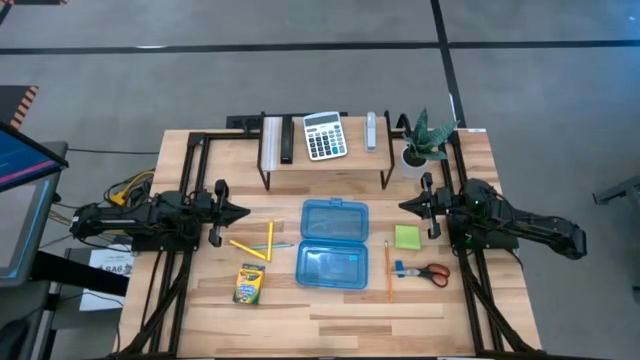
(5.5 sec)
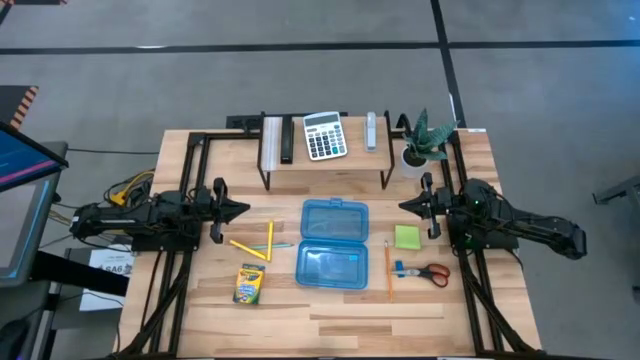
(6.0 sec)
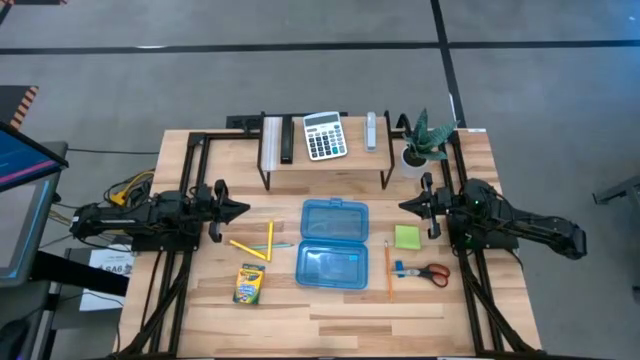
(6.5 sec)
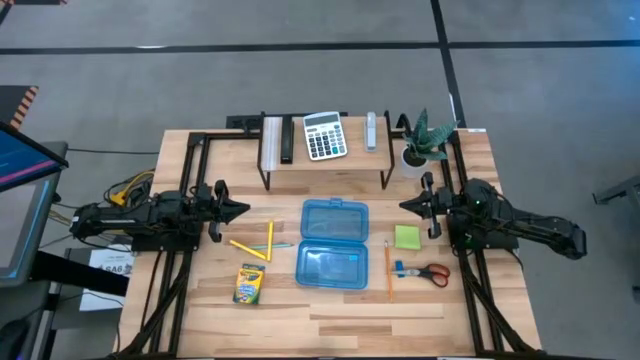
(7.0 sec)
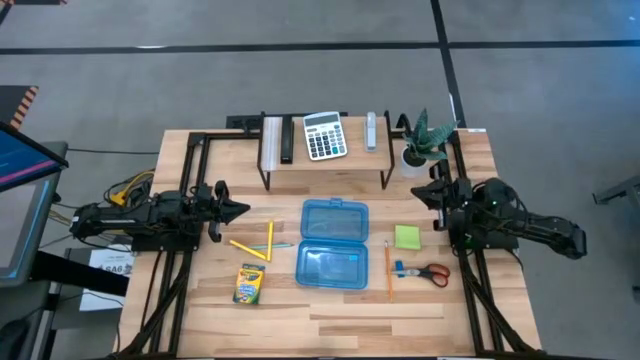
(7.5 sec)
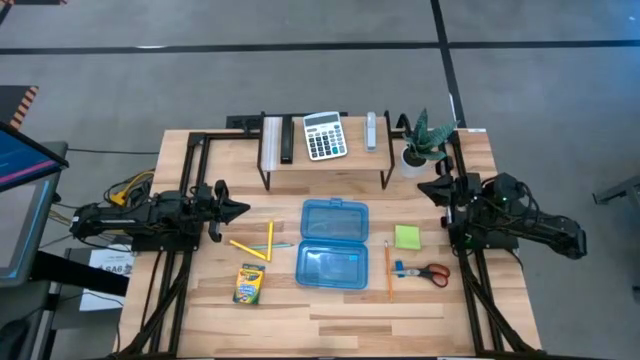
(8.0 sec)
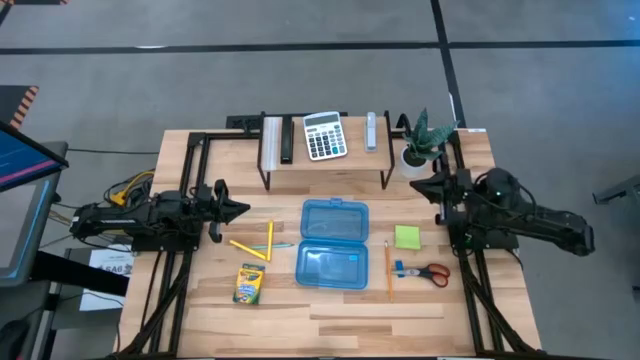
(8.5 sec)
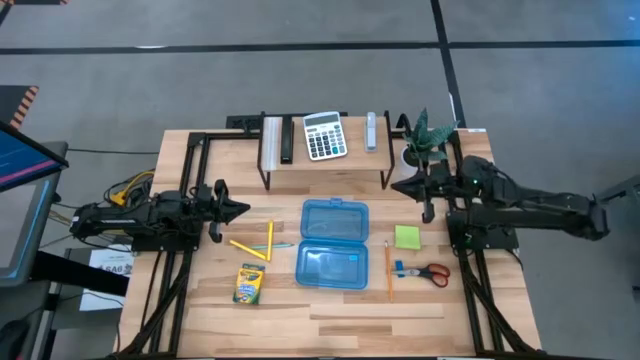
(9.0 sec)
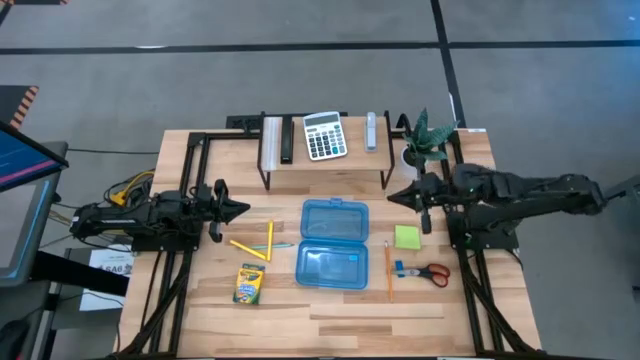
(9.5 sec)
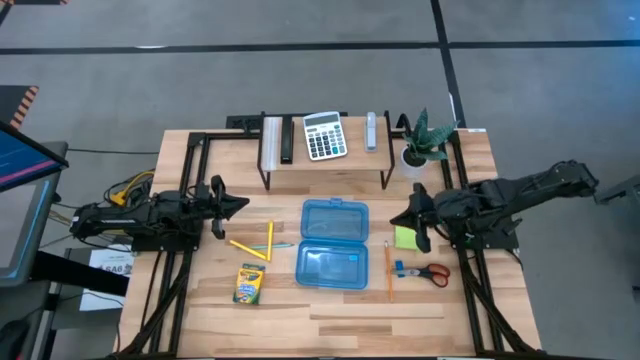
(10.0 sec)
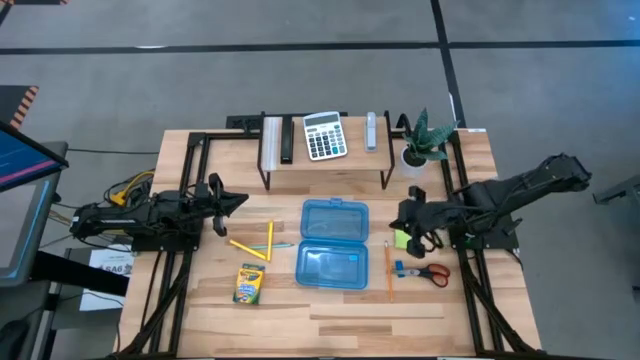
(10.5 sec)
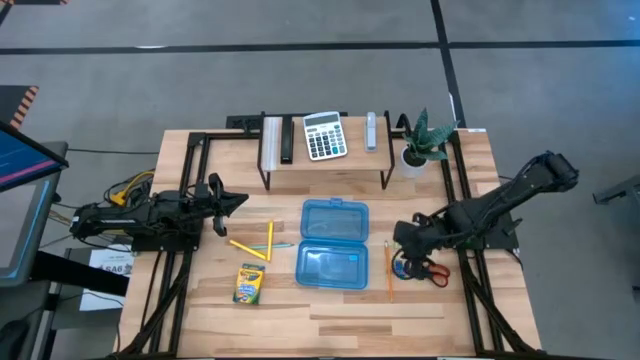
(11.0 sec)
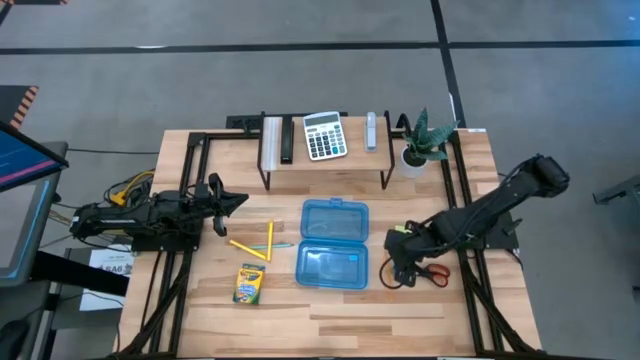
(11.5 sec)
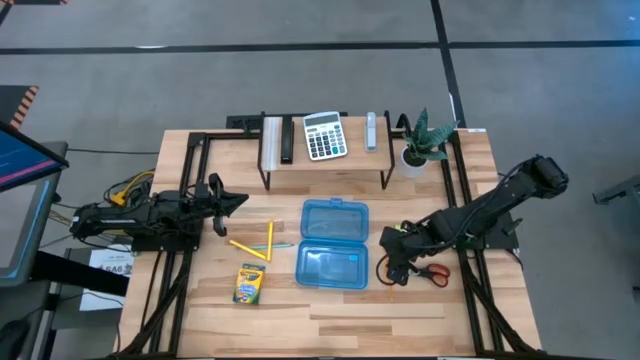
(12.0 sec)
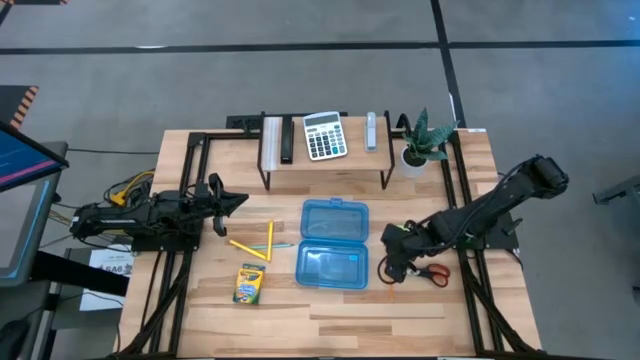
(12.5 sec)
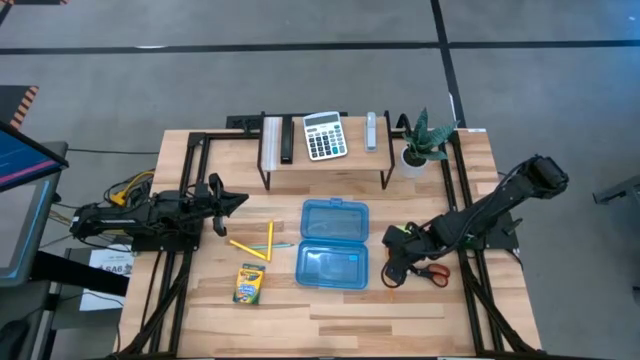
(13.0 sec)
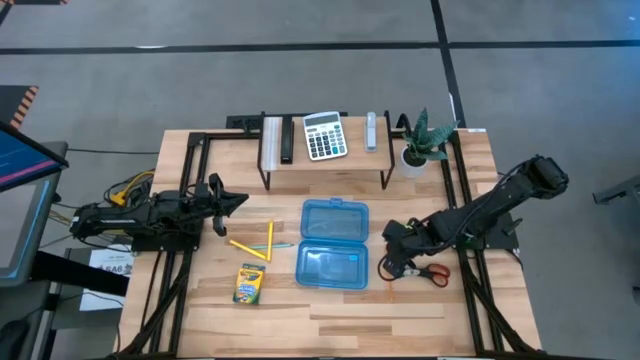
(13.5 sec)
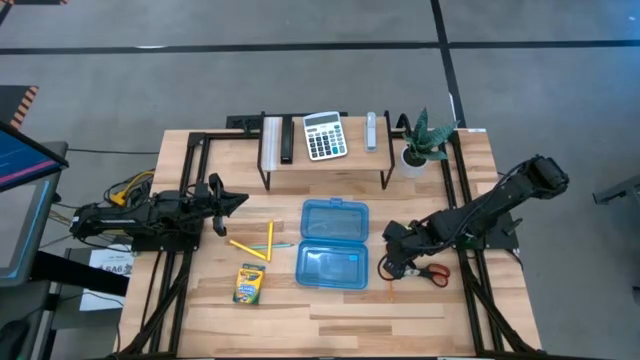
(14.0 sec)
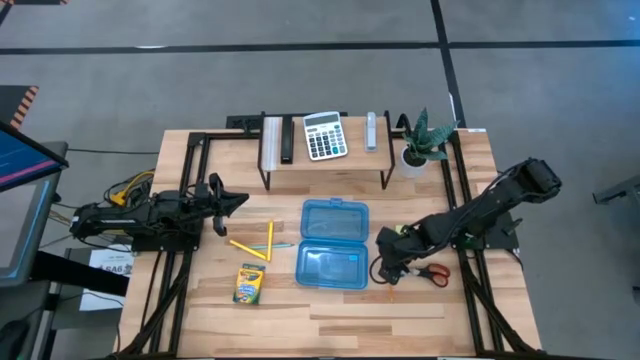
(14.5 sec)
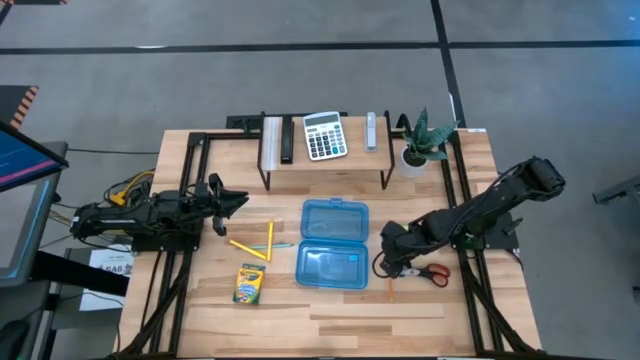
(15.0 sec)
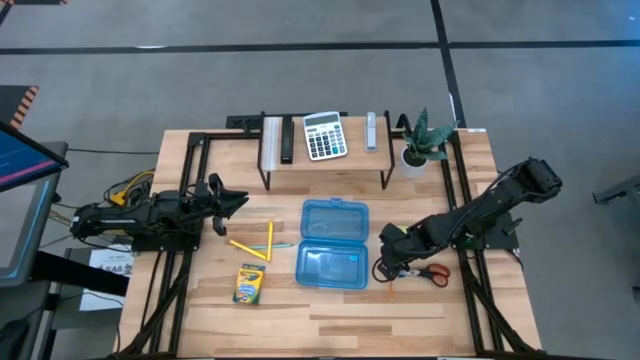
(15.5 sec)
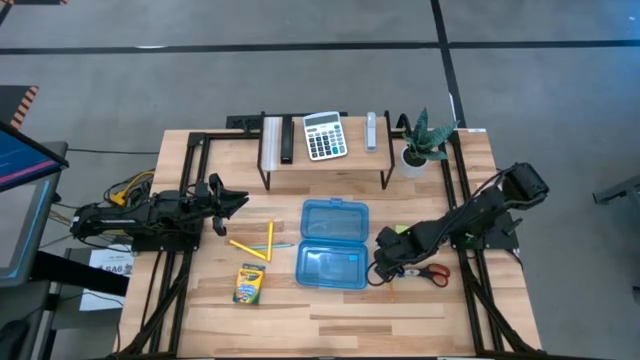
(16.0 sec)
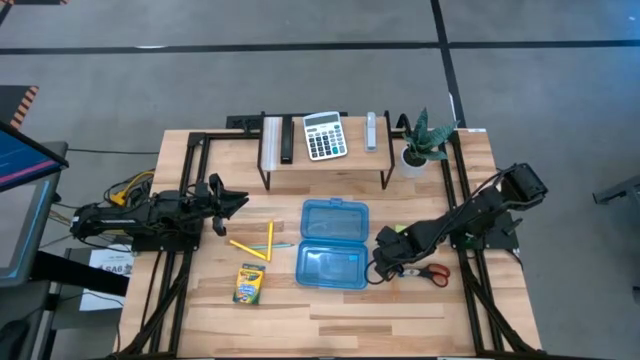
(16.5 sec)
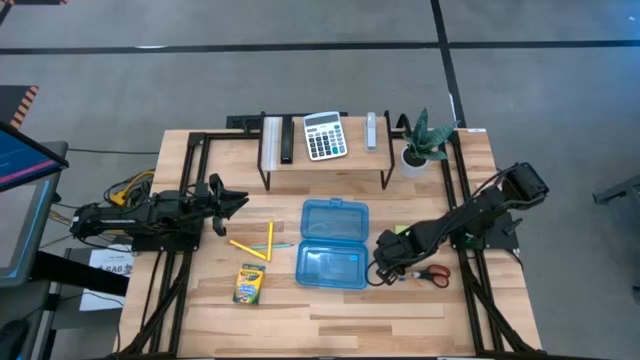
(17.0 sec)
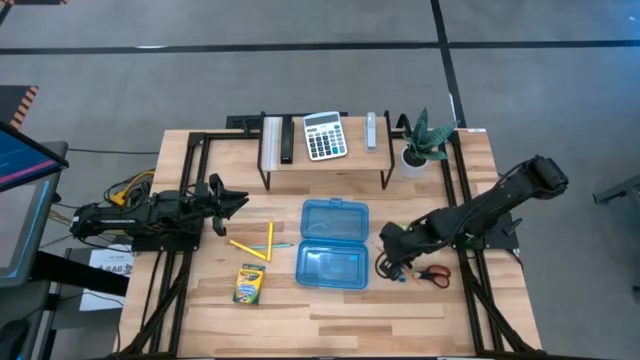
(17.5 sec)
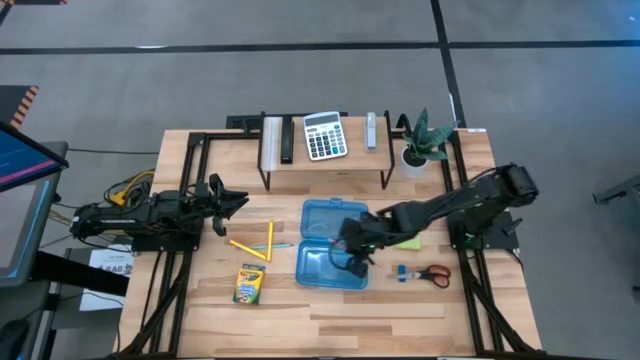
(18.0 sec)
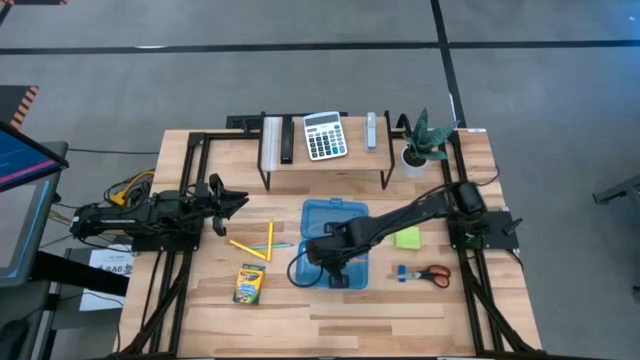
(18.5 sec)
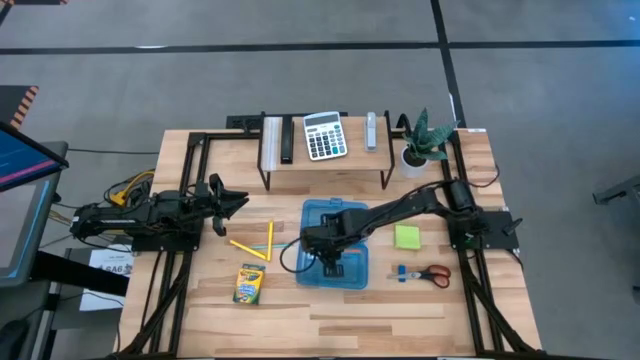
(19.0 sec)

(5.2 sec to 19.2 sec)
Task: Pack school essentials
Put the orange pencil into the supply box

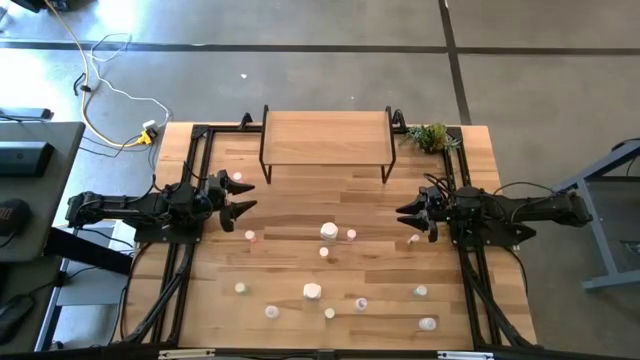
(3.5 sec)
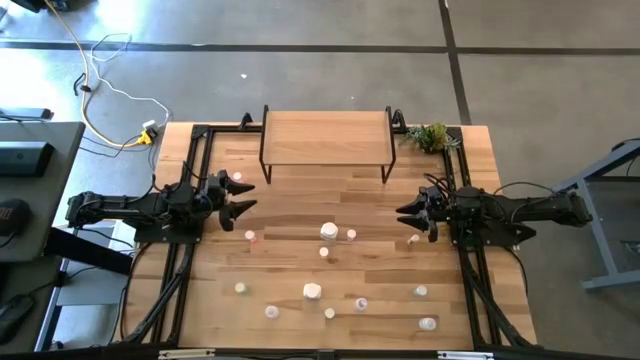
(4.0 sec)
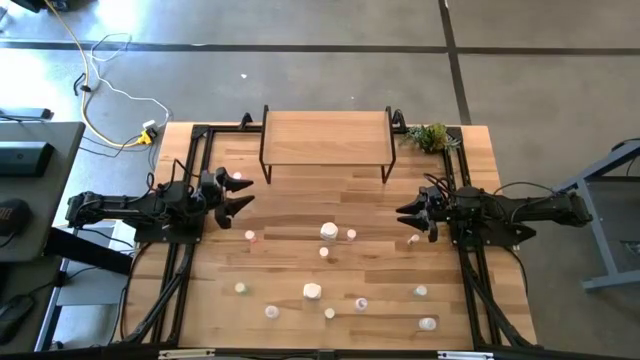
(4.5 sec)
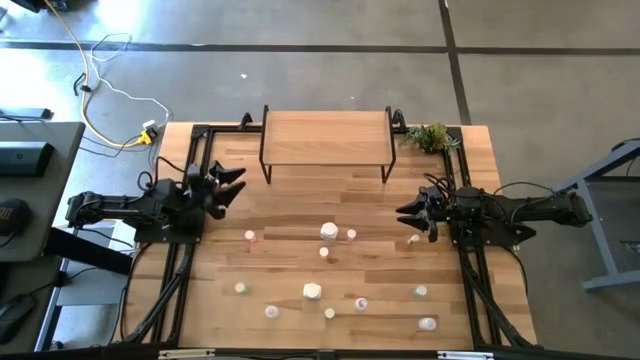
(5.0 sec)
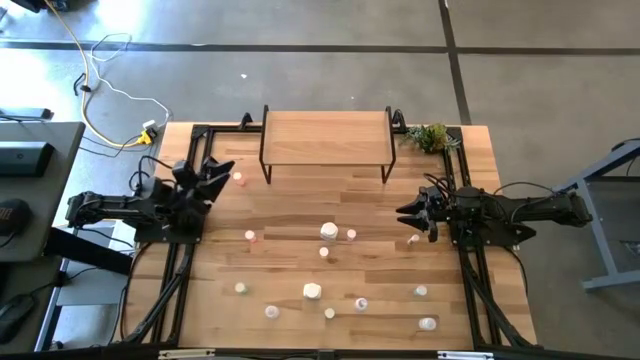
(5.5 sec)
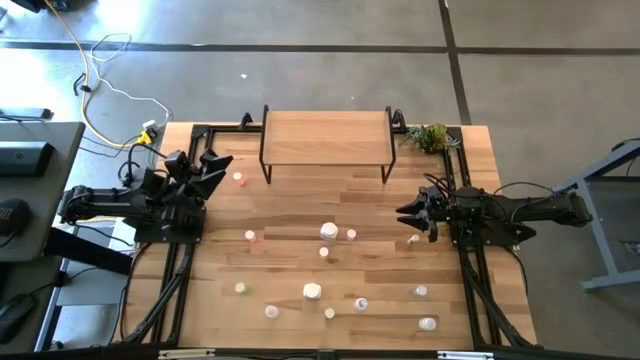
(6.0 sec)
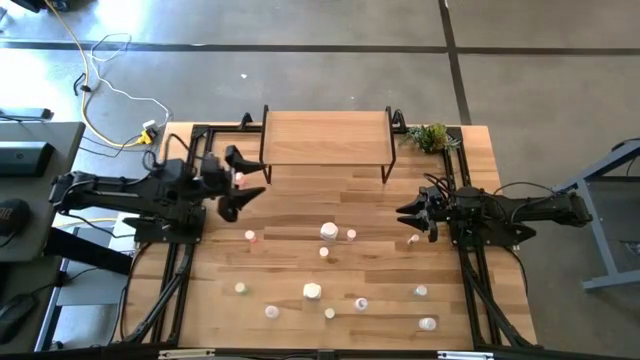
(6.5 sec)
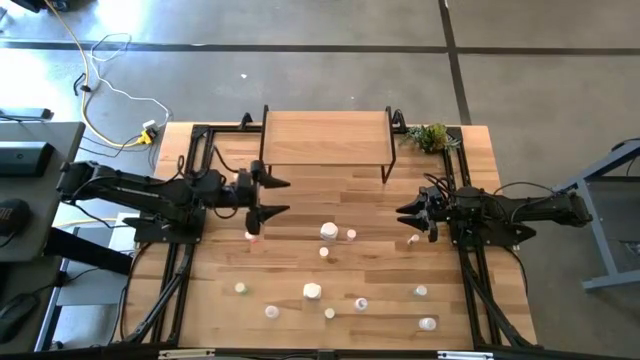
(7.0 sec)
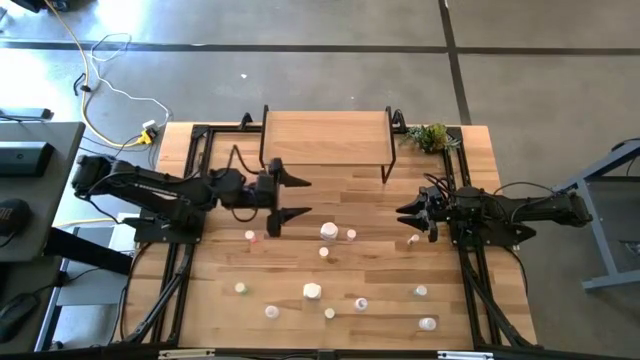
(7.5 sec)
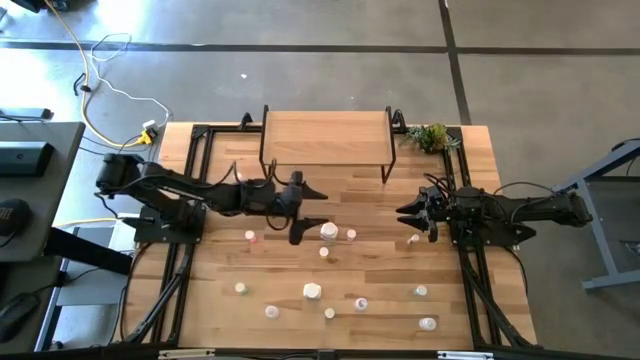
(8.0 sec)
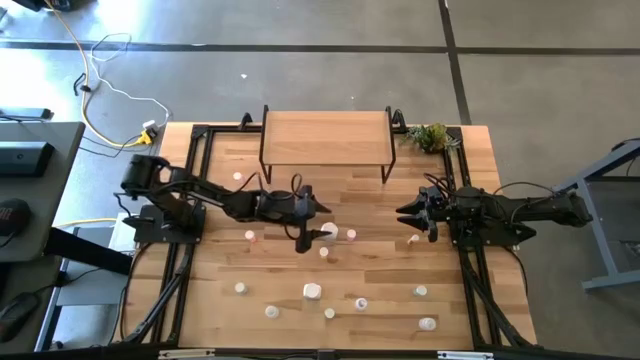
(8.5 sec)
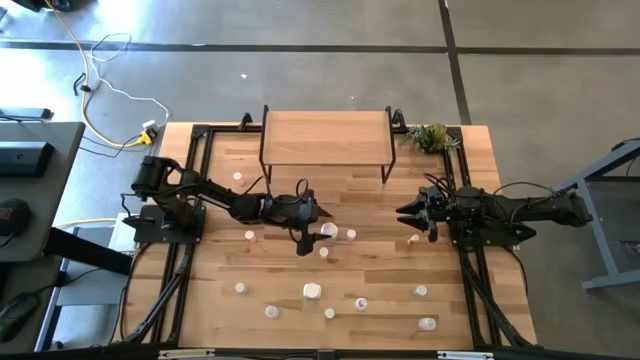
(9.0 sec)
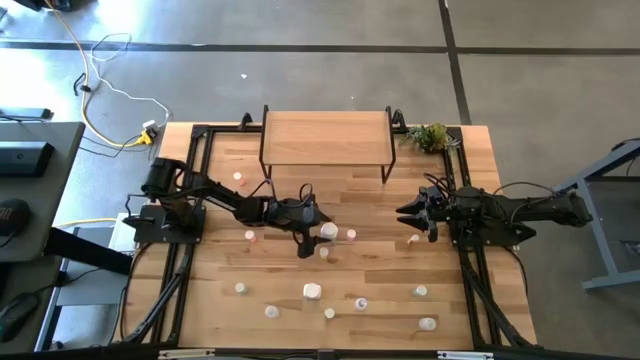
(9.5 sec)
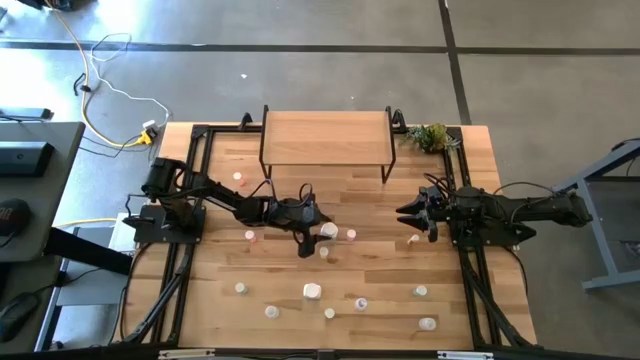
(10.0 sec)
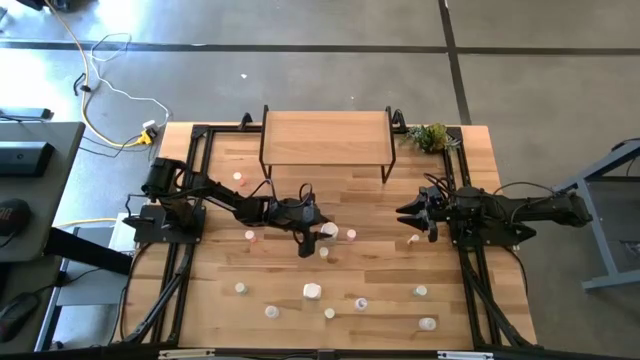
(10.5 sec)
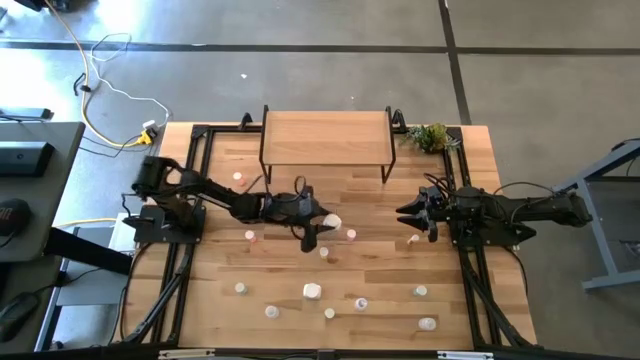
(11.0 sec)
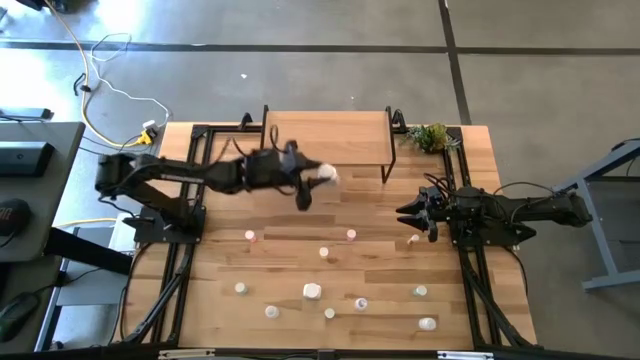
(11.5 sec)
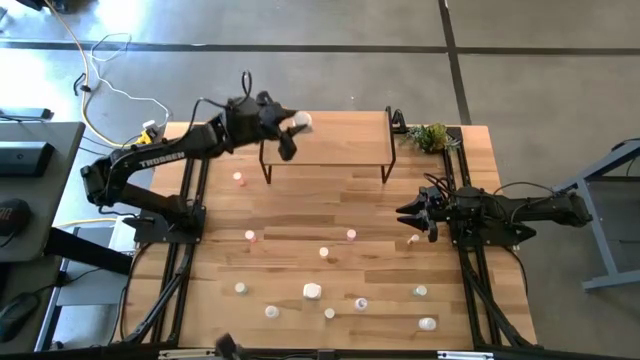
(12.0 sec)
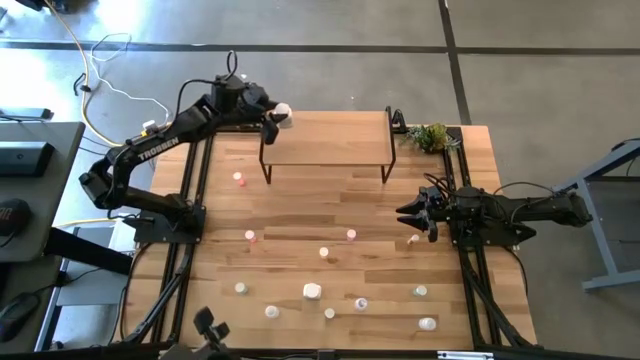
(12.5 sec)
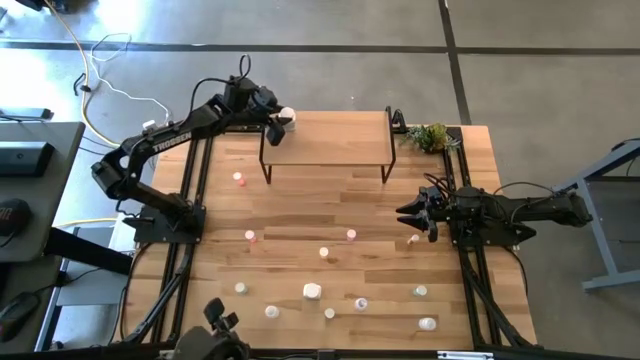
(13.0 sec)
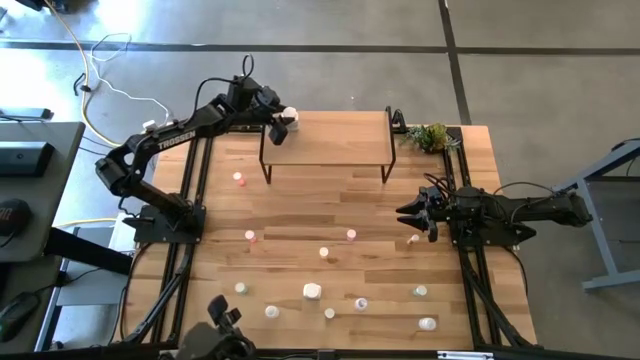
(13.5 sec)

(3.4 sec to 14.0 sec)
Task: Pick and place medicine bottles onto shelf by color
Put the top white pill bottle on the shelf
